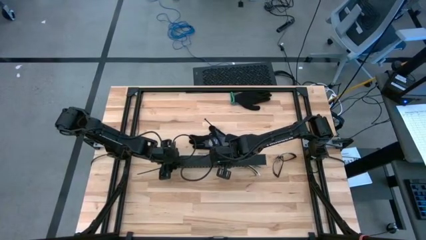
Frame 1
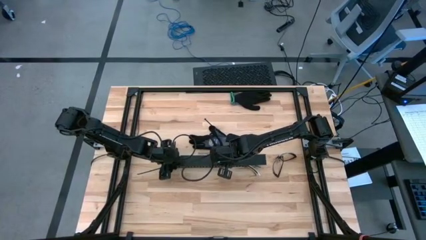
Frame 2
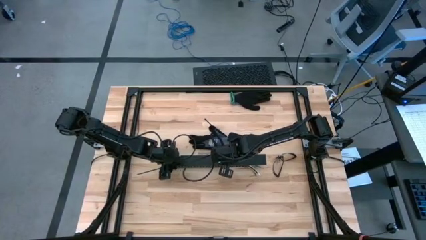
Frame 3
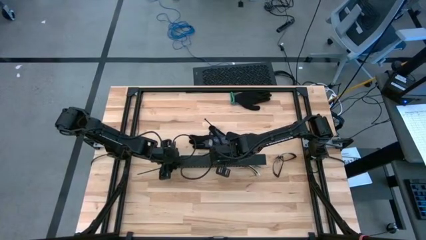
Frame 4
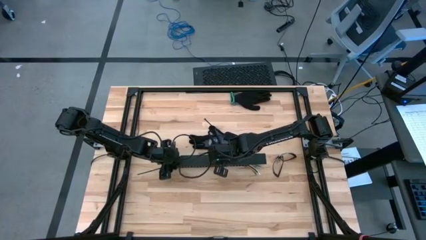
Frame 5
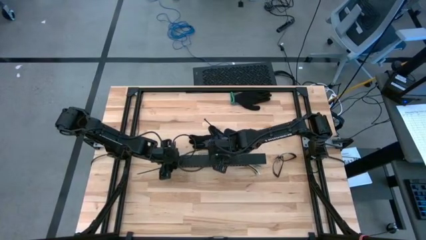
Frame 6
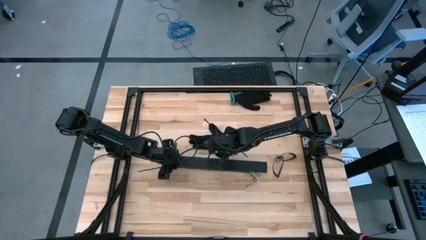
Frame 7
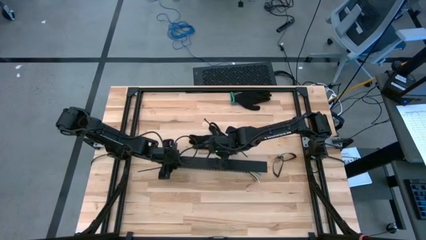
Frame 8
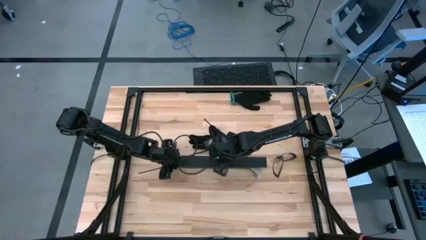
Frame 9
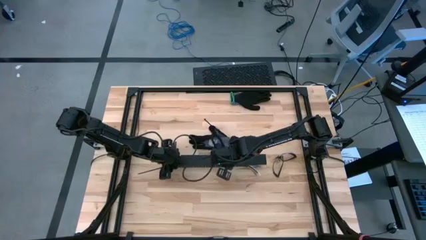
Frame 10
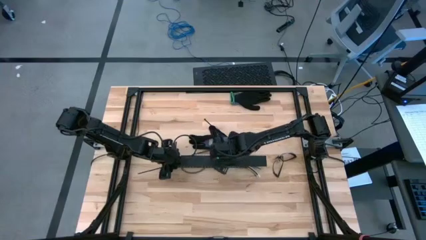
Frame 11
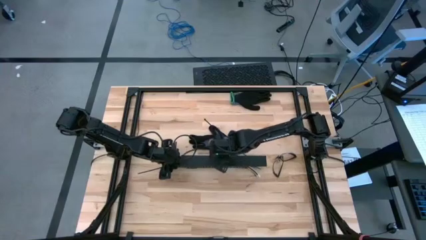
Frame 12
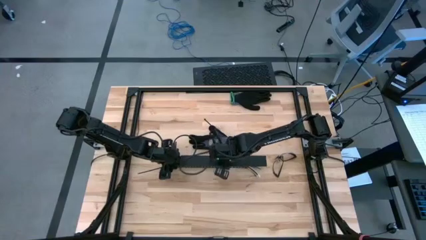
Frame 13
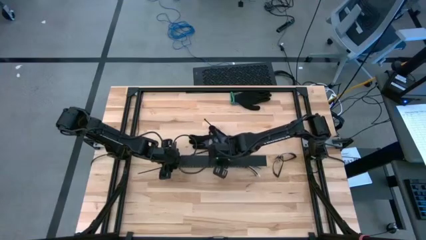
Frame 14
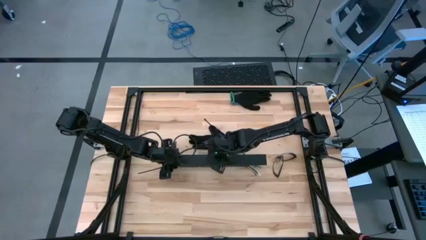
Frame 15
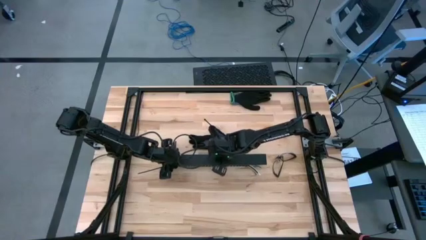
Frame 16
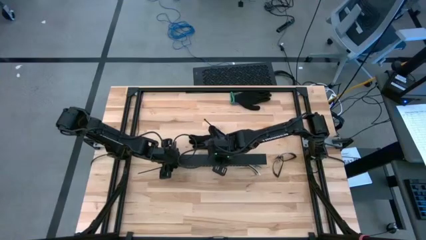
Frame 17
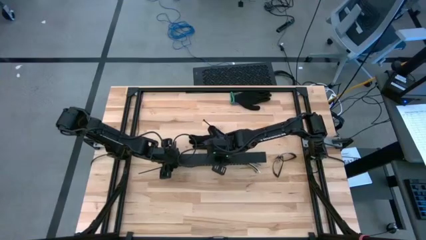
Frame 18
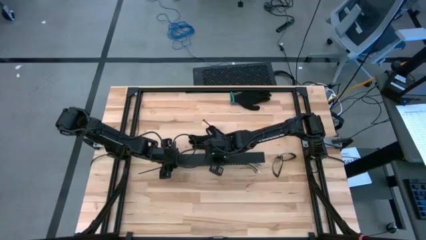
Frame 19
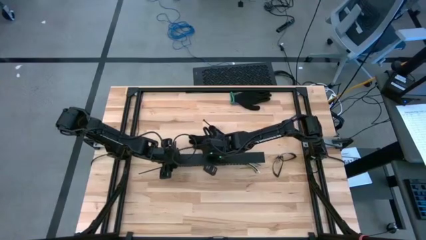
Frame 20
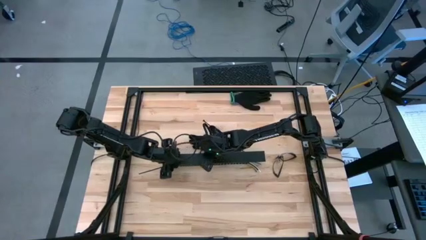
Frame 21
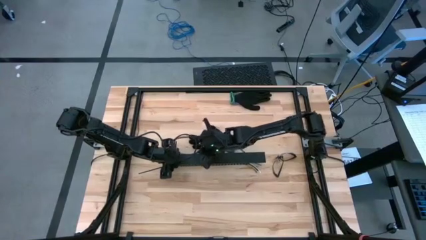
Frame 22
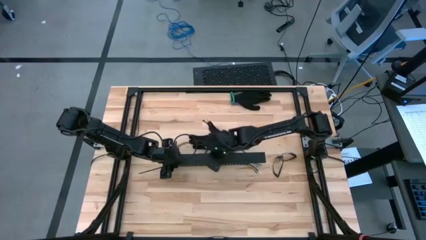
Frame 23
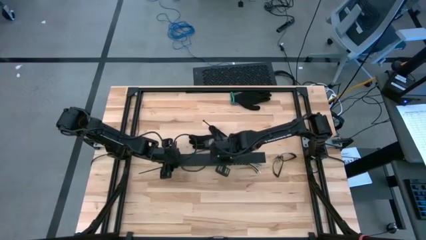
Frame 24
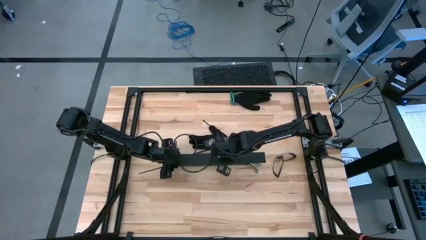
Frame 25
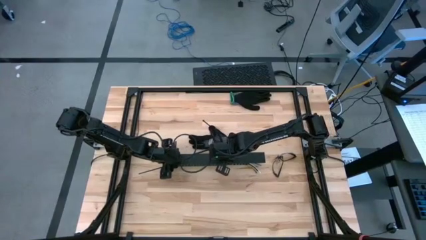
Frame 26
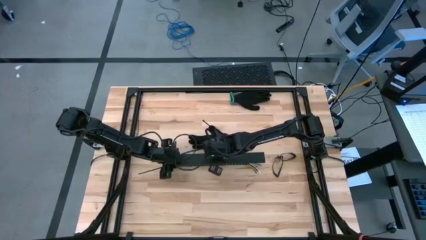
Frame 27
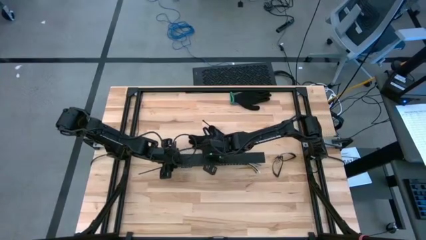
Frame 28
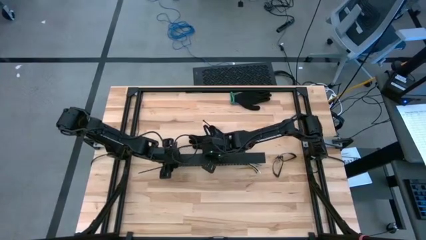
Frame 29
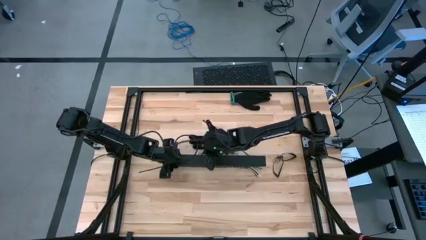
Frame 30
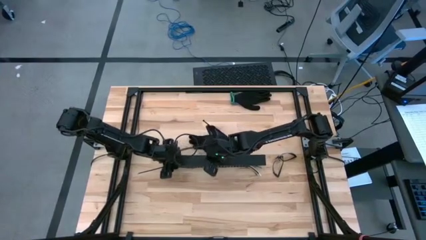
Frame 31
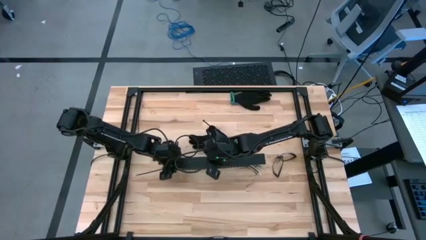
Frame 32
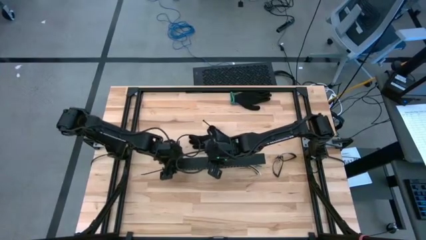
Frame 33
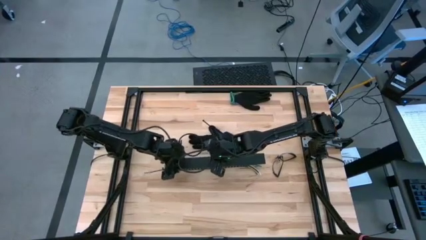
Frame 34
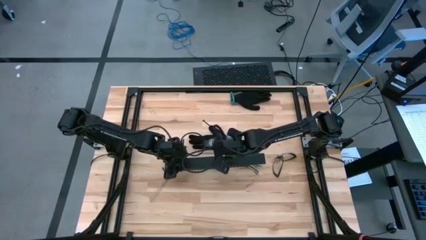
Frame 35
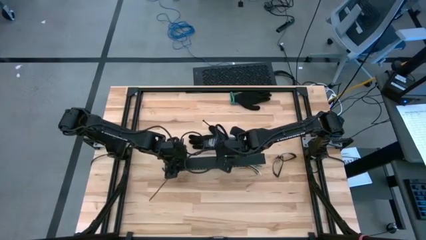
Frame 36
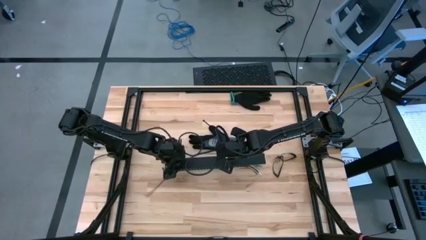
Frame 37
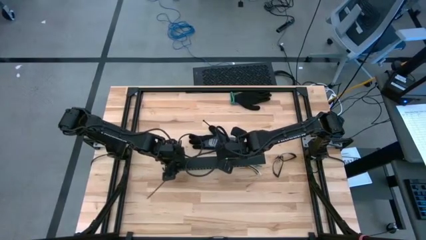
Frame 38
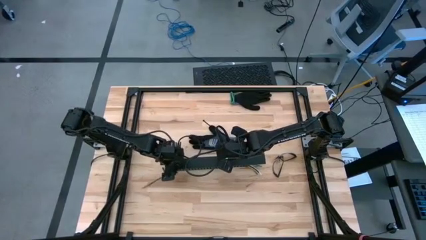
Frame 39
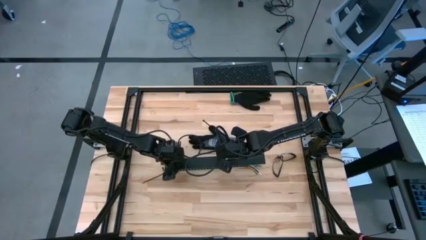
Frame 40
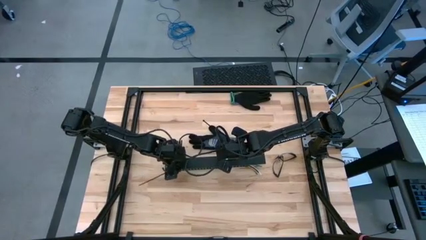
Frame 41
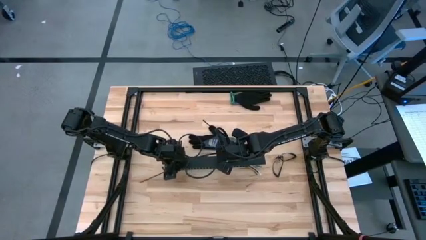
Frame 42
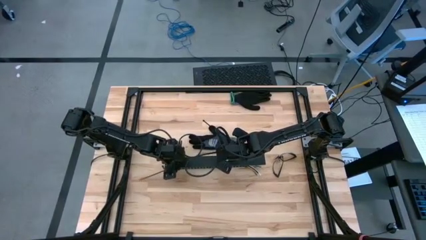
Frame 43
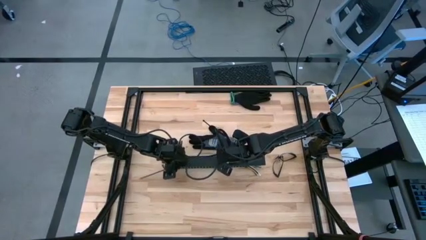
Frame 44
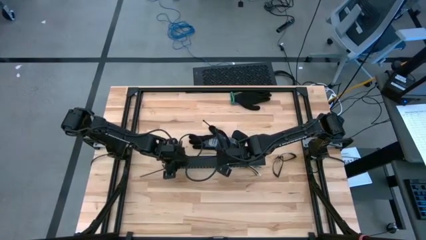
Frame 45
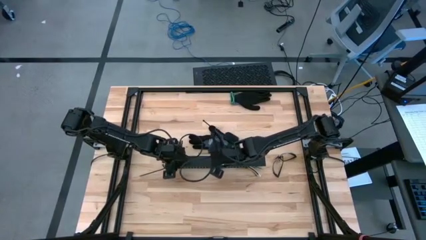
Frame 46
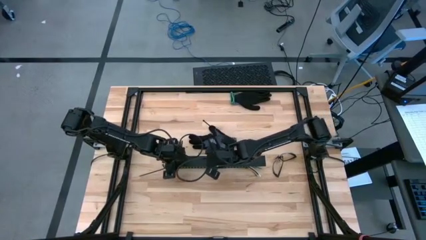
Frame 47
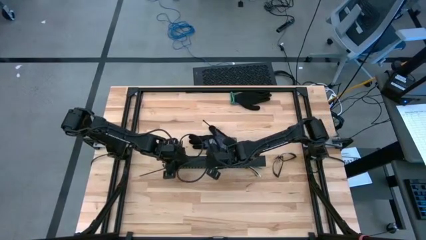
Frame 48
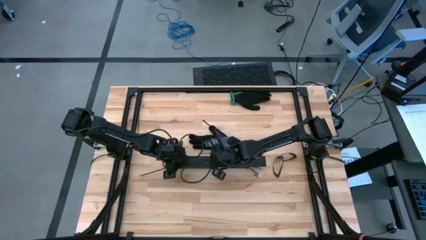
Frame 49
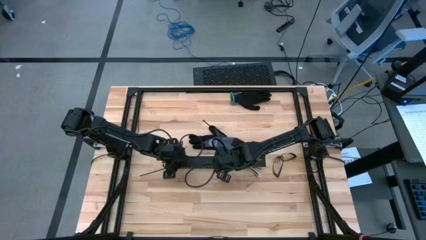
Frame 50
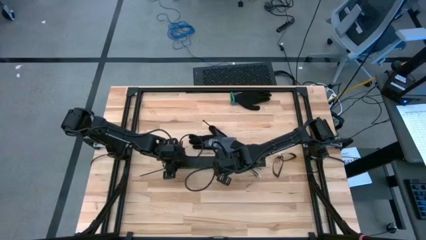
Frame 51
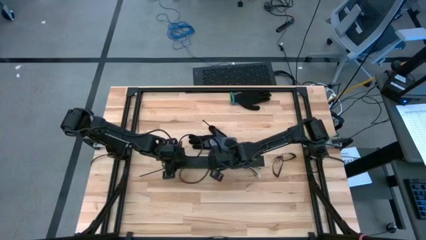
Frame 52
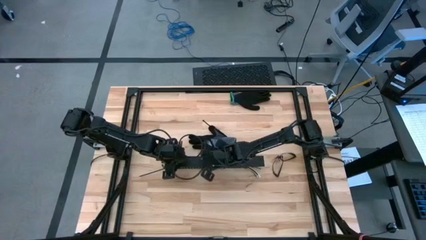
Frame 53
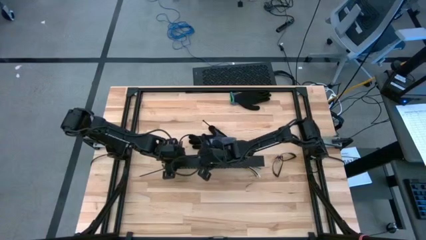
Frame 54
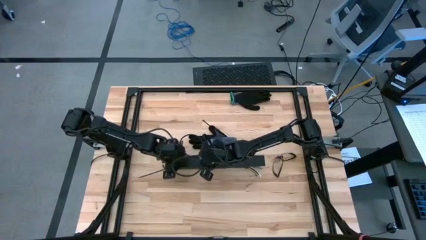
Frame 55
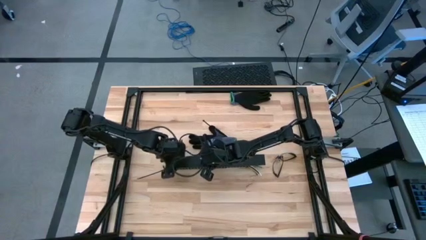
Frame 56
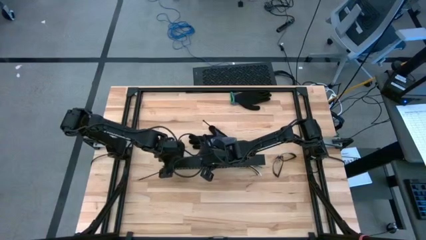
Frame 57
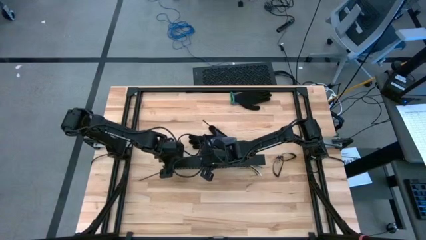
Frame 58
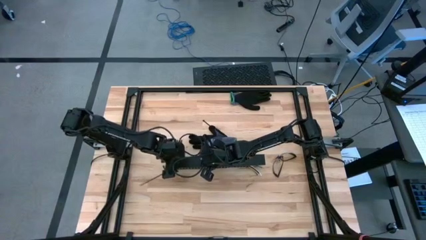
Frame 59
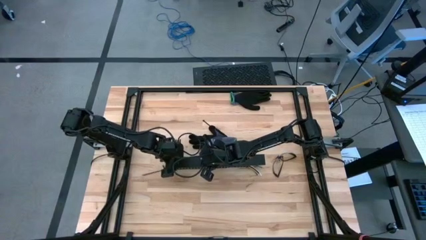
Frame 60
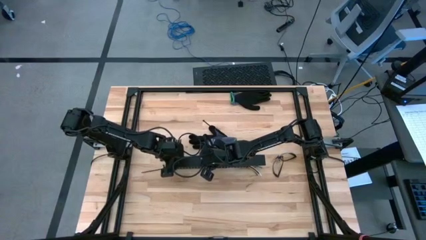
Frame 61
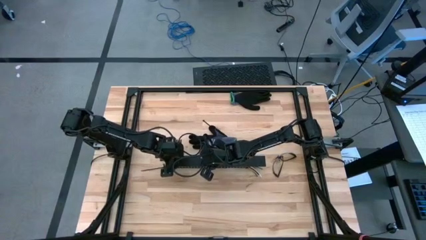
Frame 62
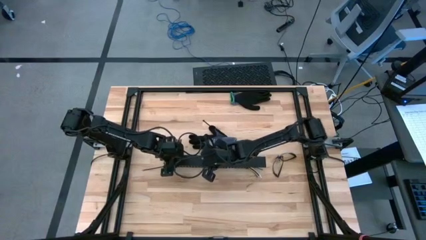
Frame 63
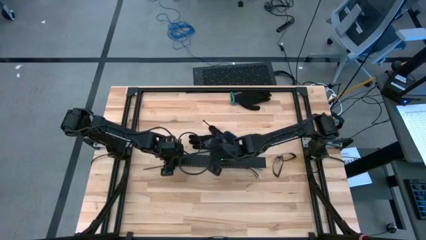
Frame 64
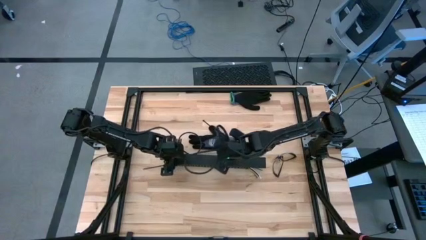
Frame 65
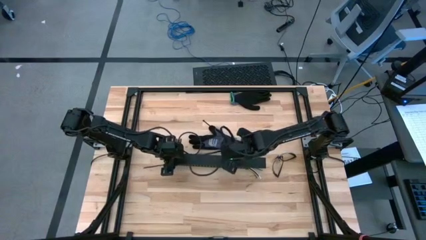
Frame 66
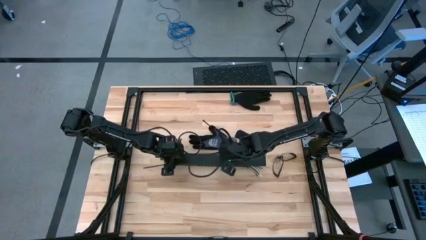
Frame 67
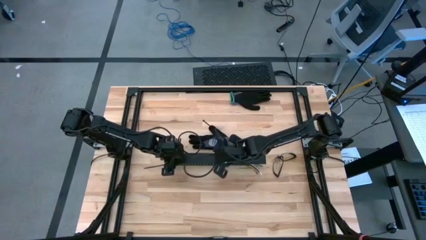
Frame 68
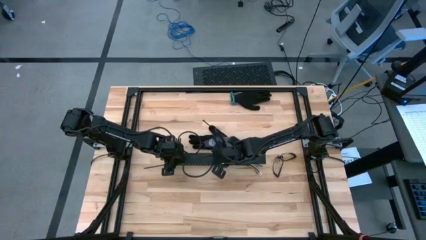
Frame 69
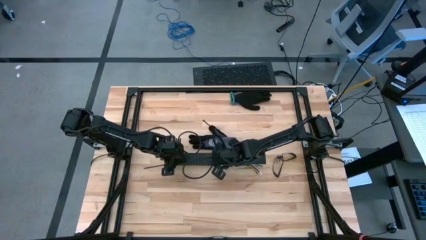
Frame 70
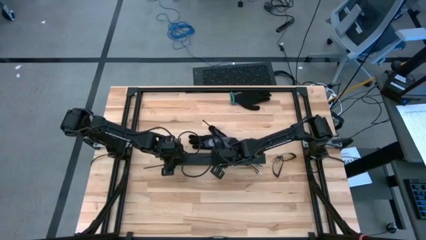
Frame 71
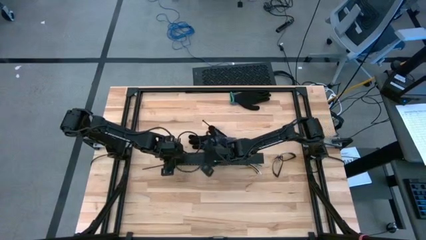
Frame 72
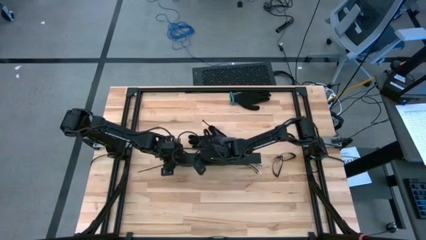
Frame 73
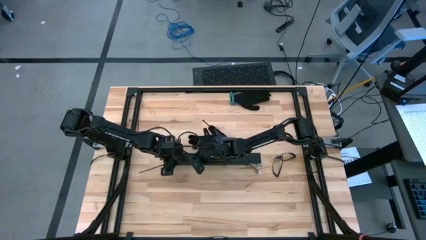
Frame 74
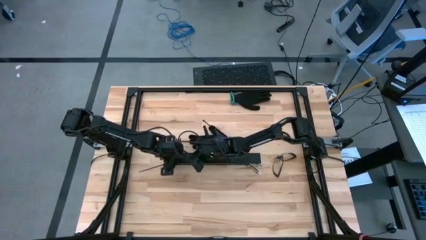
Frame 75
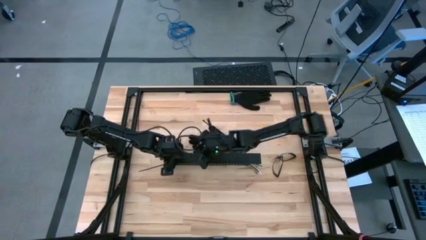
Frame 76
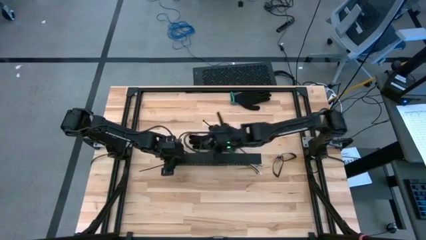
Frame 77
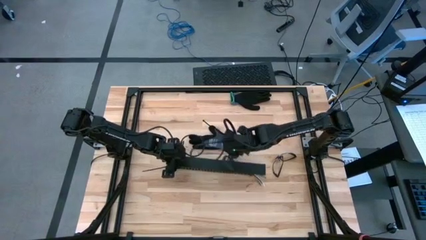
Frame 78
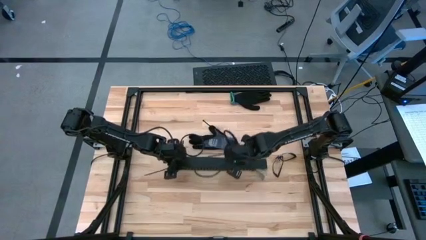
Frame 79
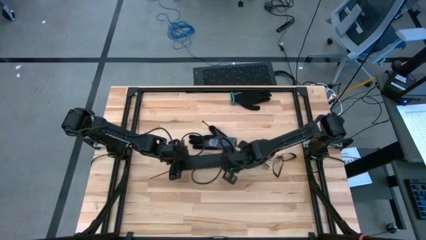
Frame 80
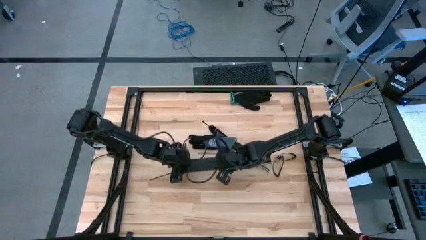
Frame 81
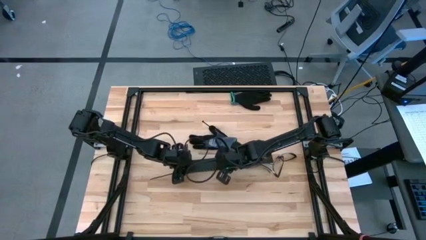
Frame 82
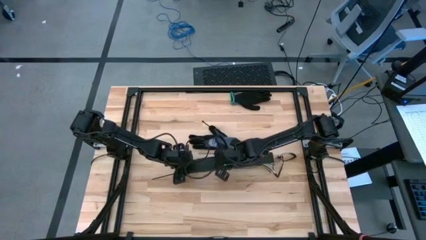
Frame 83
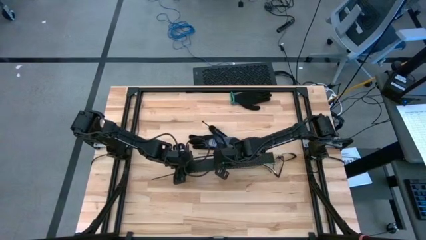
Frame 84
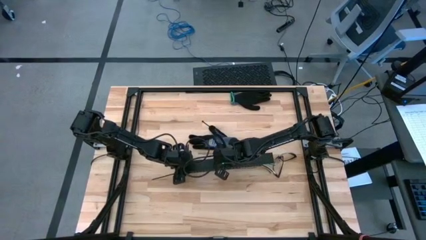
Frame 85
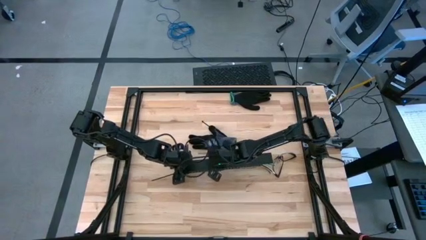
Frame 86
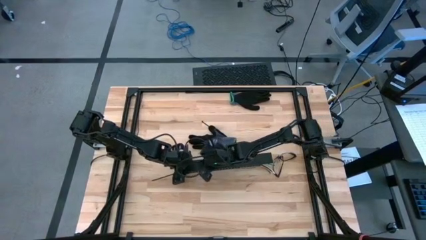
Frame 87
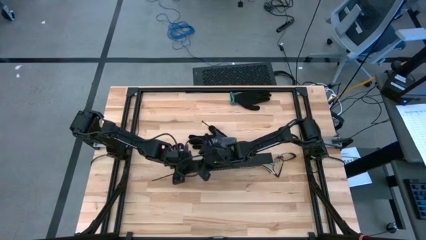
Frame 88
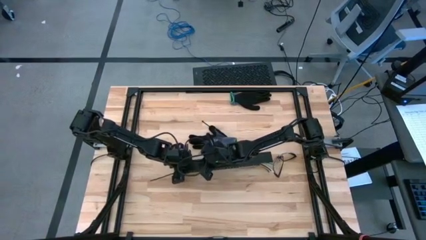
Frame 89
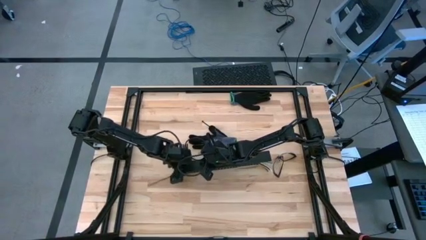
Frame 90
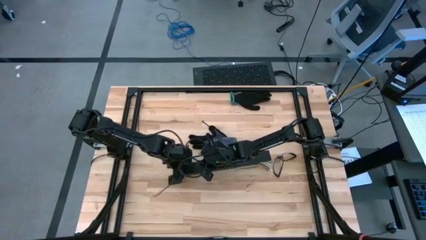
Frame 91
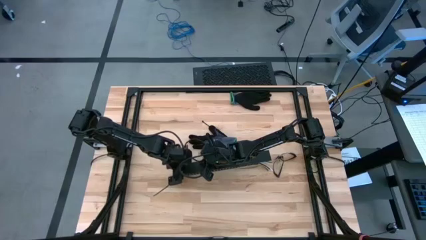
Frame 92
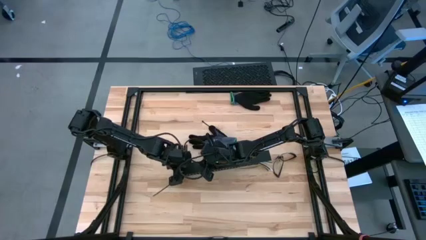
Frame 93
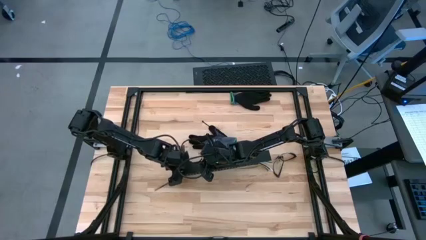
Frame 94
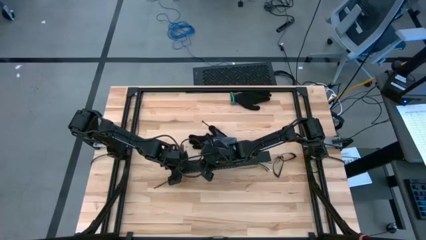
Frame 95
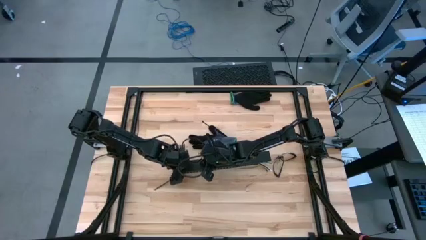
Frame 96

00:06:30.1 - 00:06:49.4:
Task: Ziptie cables
Close the black cable duct
